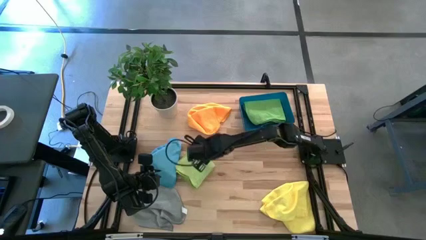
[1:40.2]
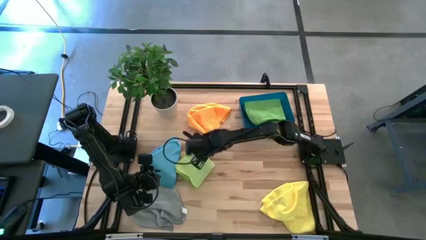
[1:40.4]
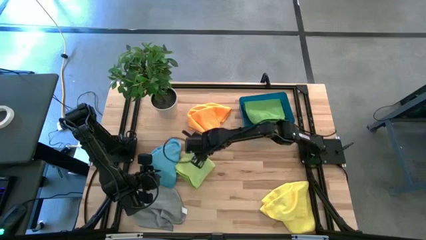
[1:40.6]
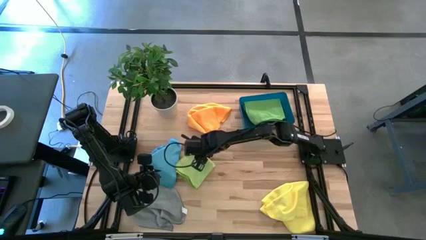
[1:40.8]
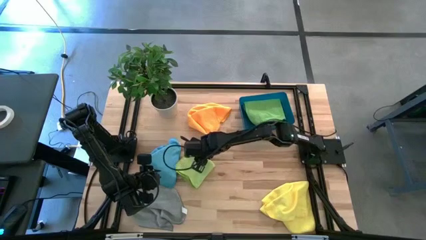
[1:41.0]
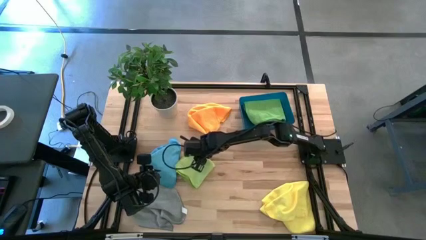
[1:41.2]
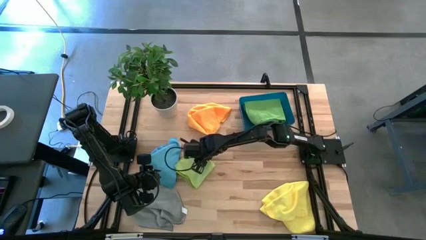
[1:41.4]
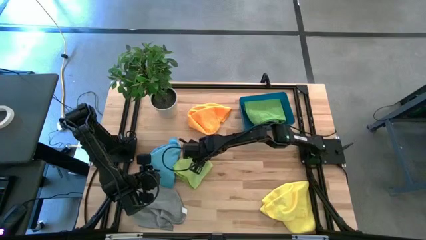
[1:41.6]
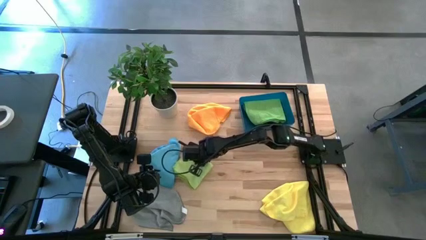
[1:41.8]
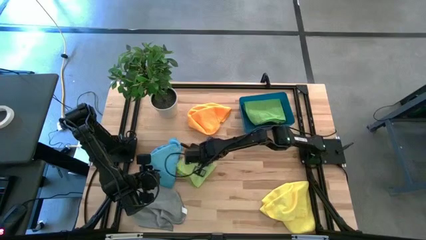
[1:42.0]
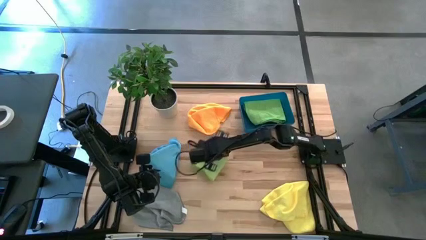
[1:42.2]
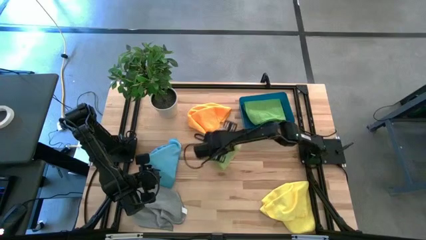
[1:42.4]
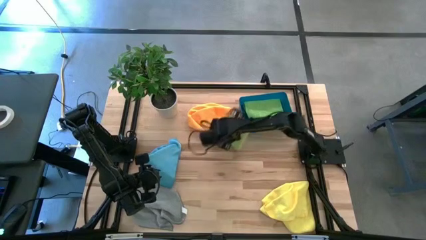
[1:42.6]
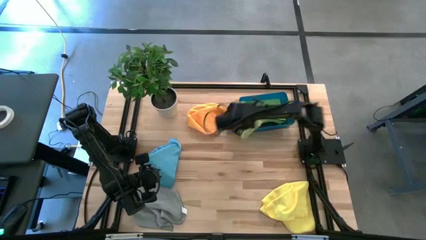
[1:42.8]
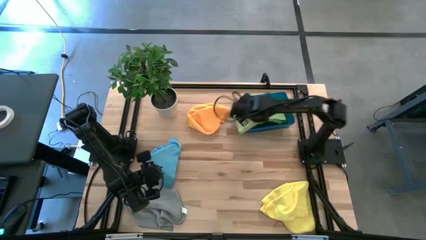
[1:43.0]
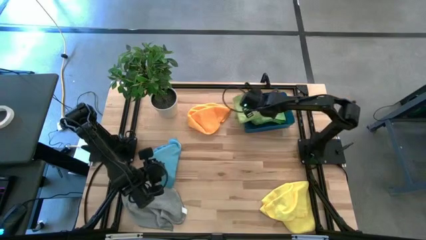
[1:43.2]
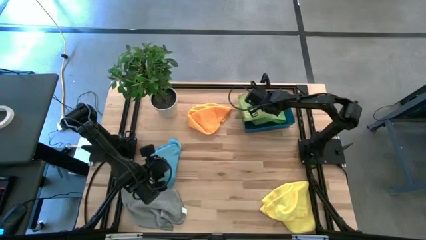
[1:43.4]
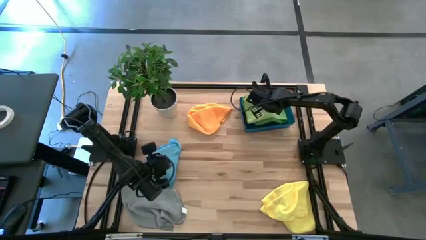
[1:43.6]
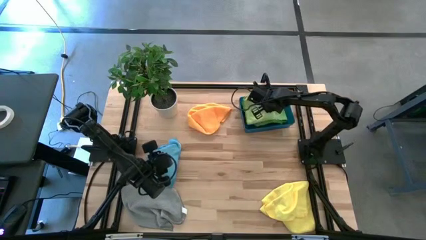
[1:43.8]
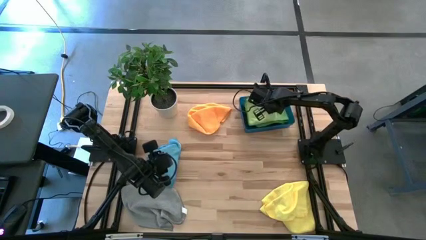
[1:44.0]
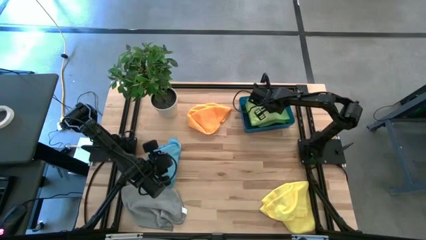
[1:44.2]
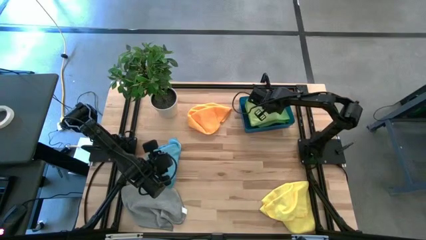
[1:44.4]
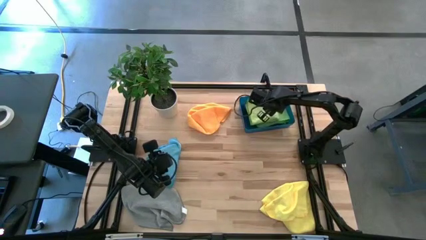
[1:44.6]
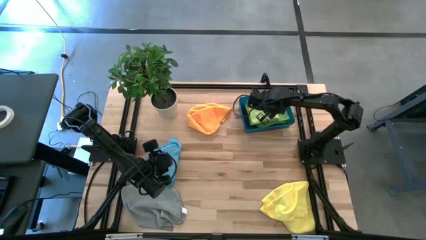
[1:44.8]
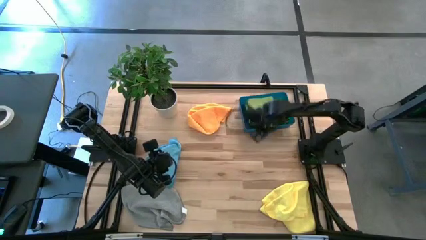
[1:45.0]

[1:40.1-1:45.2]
Task: Fold microfiber towels
Put the light green microfiber cloth into the blue bin

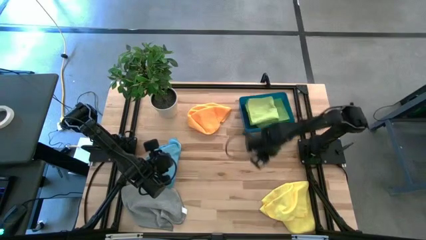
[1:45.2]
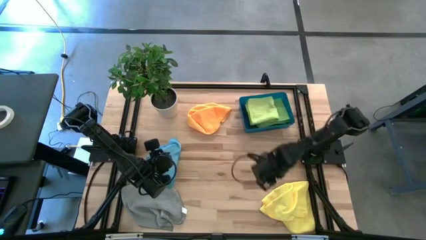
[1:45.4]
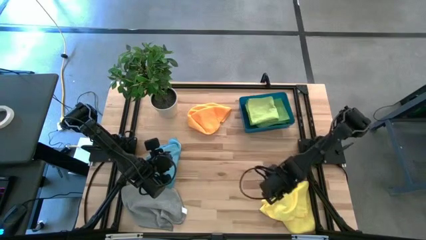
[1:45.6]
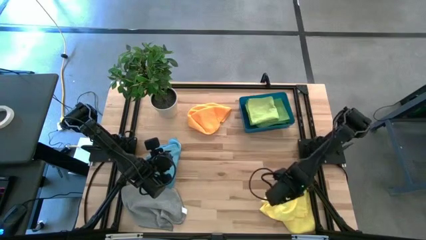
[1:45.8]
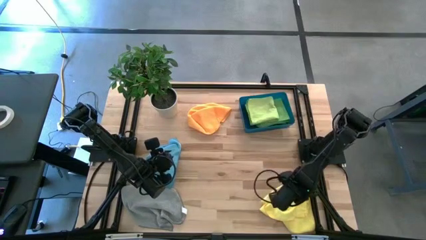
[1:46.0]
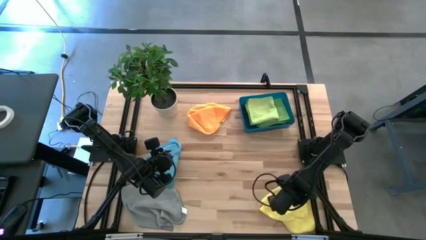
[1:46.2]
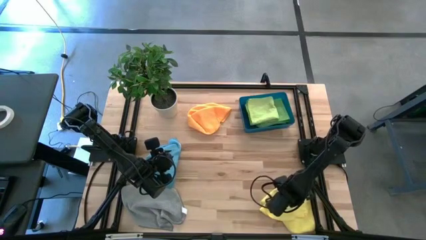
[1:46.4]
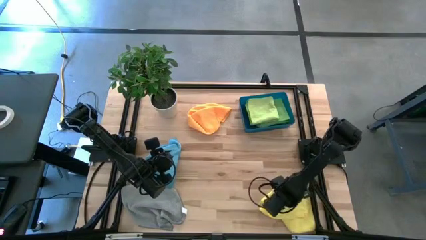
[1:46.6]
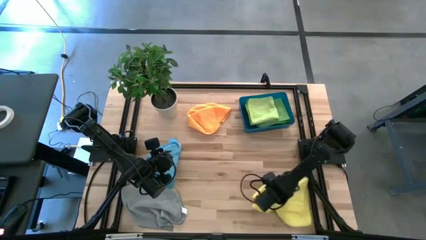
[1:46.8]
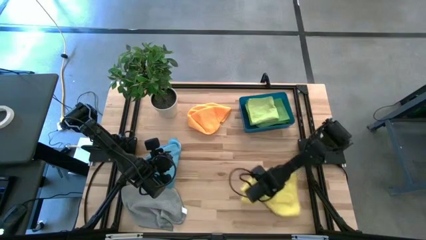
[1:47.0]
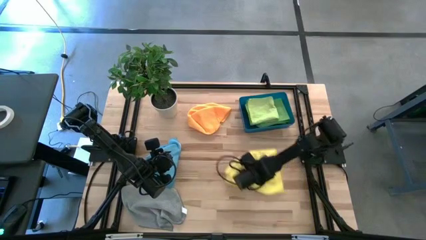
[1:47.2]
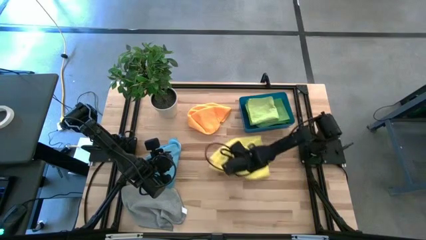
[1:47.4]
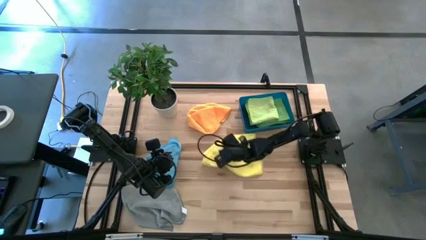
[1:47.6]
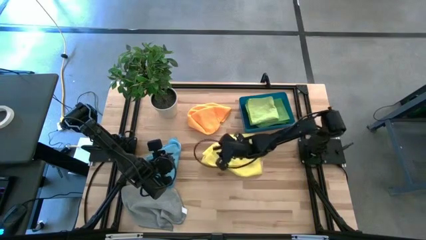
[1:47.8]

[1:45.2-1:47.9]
Move the yellow microfiber cloth to the center of the table

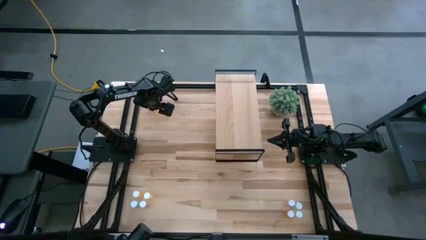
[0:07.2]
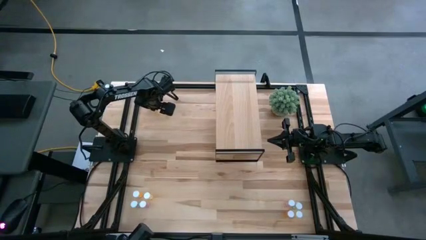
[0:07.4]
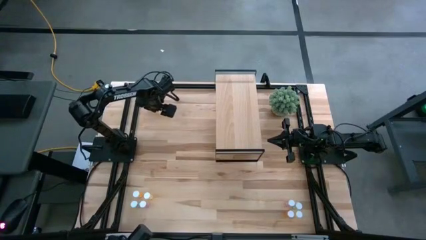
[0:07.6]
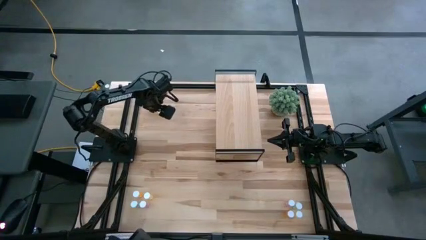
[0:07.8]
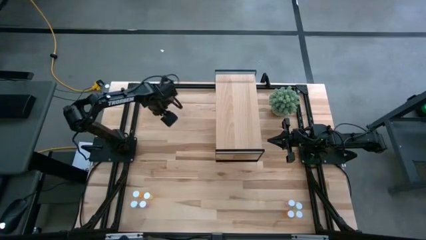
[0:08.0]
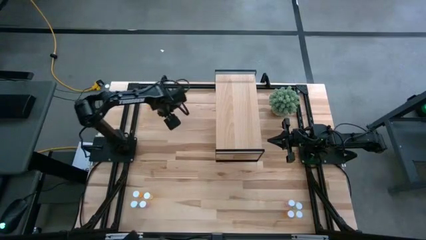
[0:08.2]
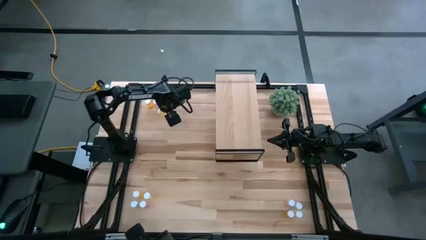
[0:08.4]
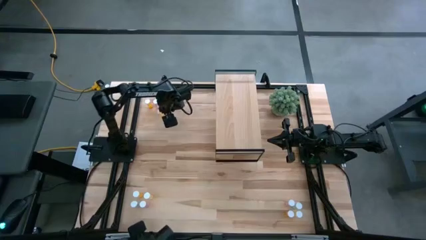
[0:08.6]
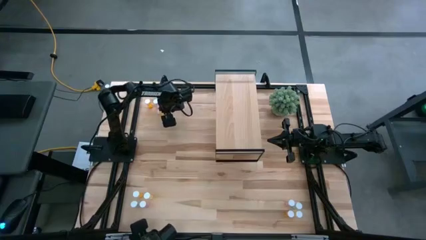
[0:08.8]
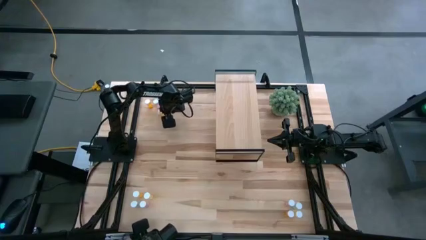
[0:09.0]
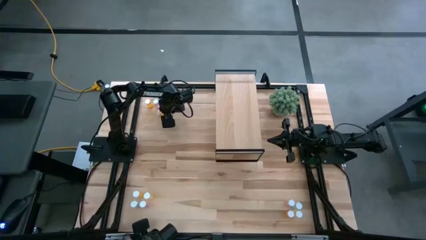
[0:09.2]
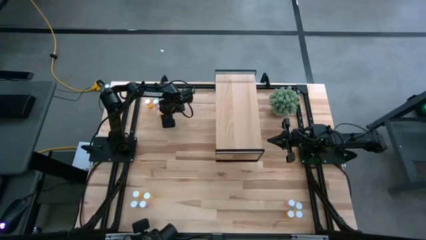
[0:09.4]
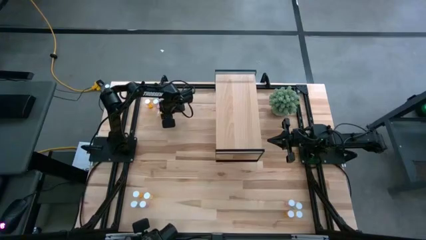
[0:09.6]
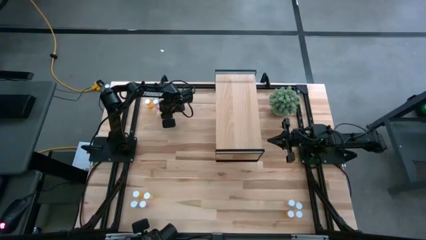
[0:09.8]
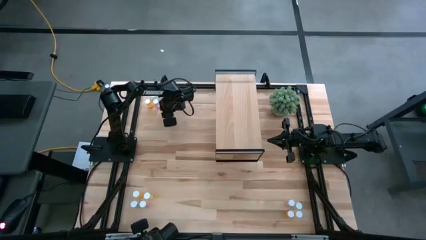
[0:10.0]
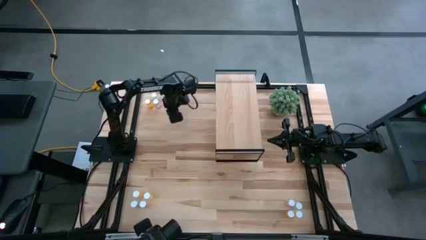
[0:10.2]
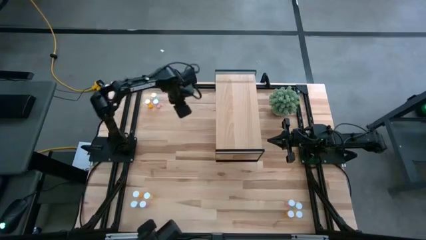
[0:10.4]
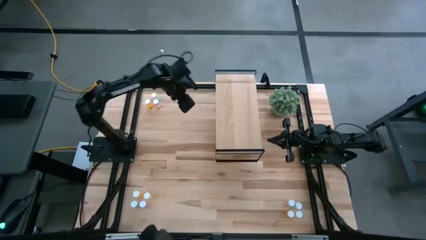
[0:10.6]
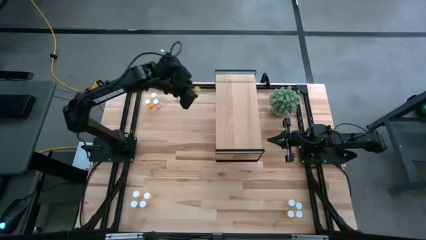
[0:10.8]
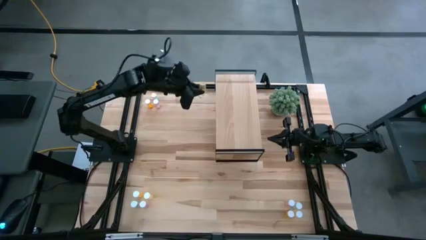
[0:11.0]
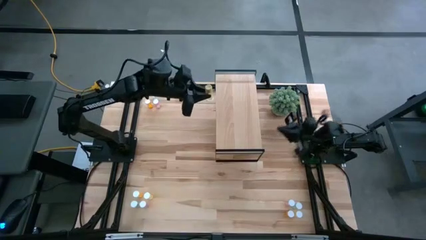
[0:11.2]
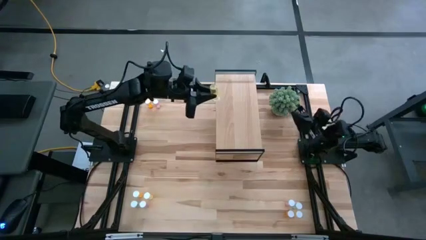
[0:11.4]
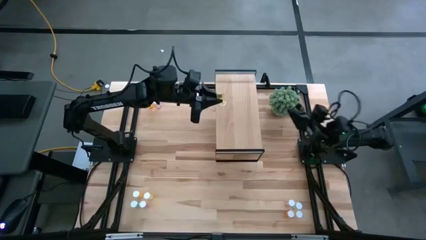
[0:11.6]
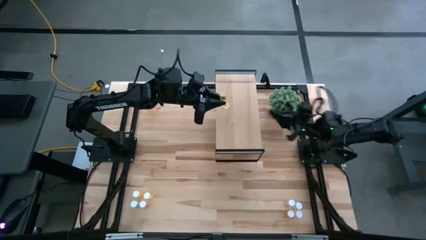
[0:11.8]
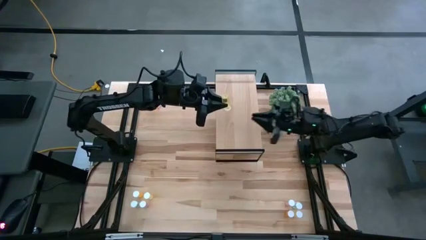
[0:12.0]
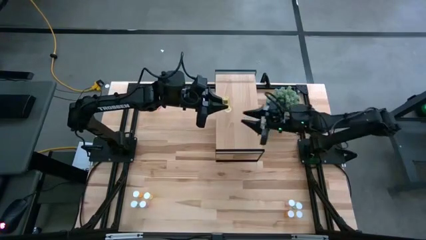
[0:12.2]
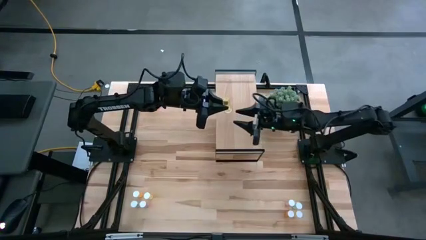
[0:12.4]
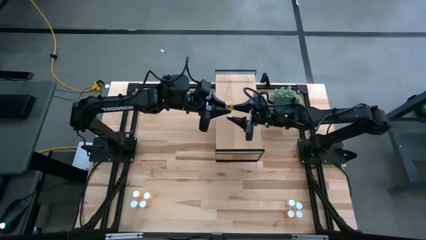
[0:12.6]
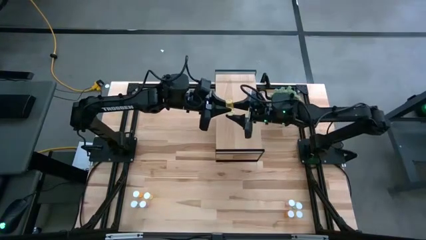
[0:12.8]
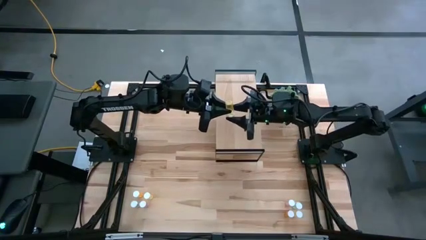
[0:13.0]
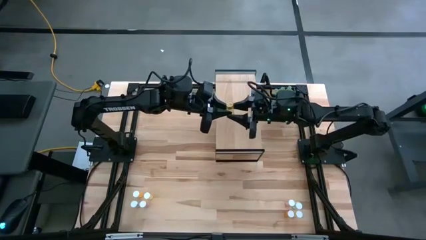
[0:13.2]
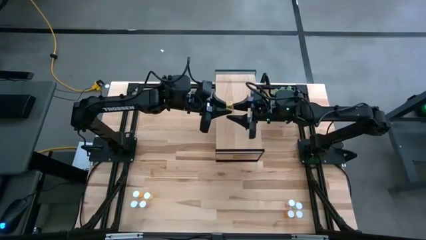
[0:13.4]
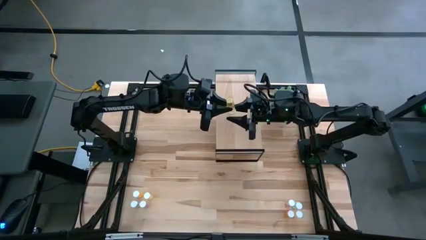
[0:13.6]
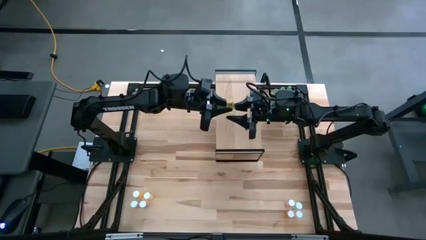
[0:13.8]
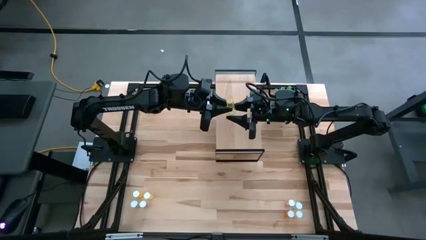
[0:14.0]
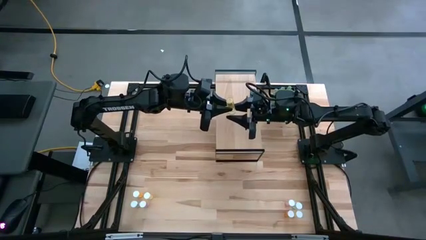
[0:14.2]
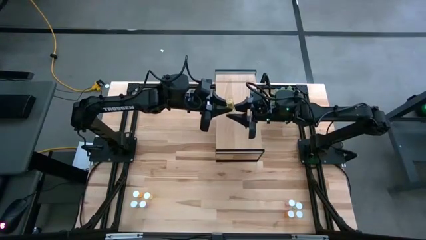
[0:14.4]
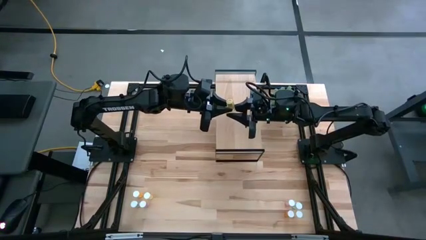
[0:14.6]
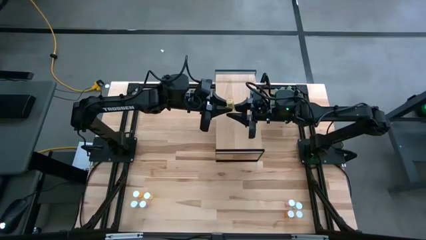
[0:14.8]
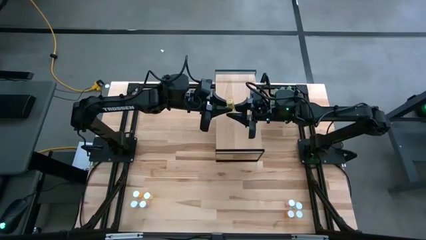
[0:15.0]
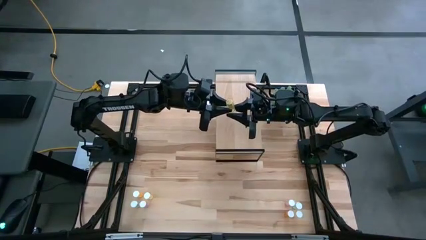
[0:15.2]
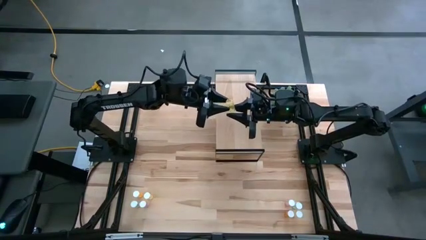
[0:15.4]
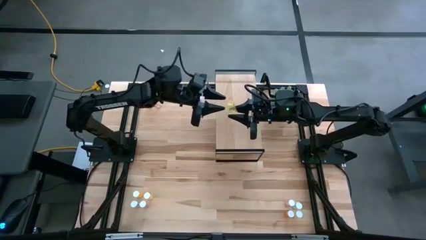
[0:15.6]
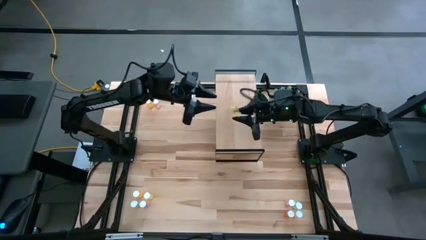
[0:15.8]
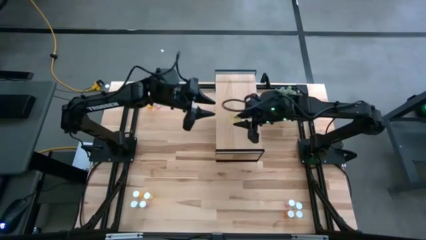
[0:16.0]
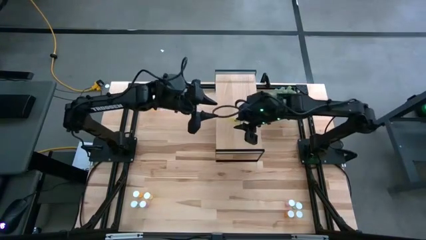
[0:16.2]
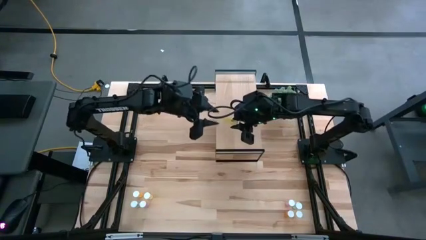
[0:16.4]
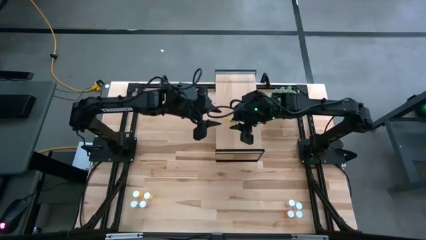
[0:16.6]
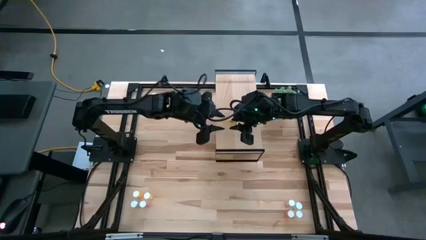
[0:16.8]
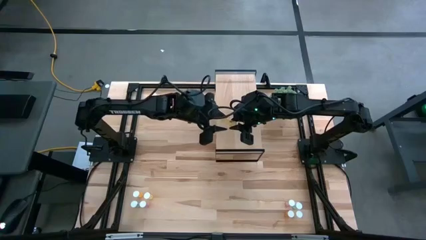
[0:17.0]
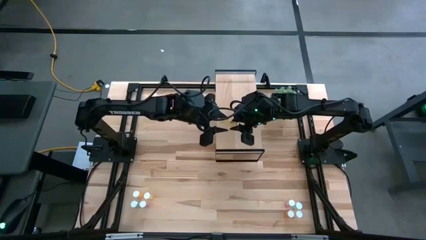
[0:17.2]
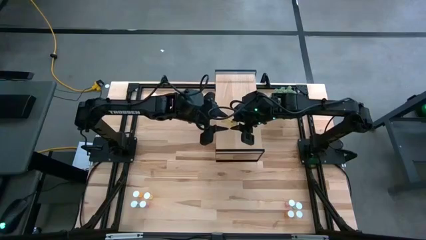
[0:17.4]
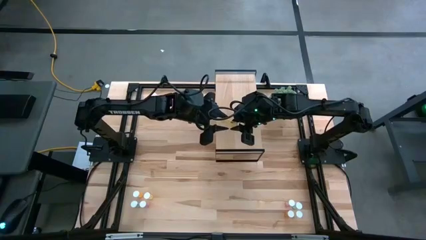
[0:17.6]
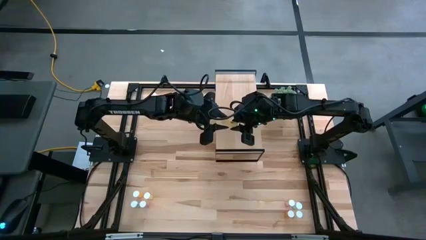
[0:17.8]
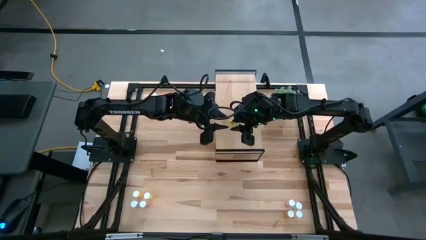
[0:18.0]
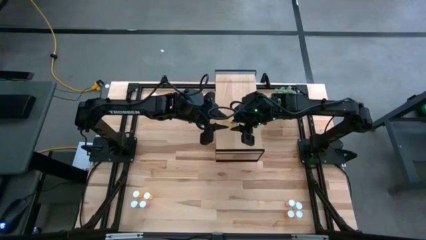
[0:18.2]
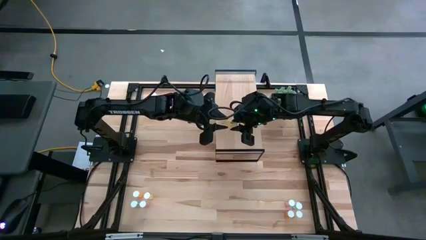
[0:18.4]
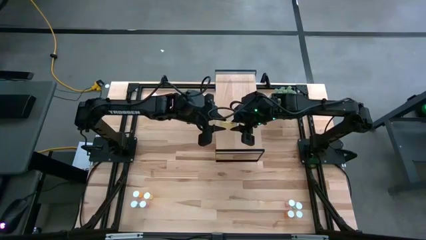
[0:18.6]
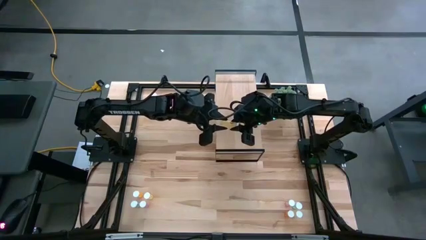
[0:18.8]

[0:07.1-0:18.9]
Task: Pick and place medicine bottles onto shelf by color
Put the top yellow pill bottle on the shelf
